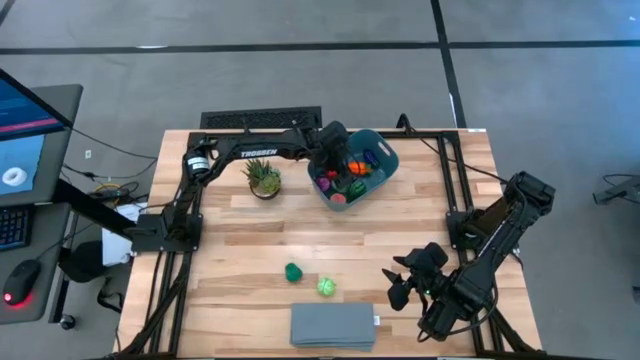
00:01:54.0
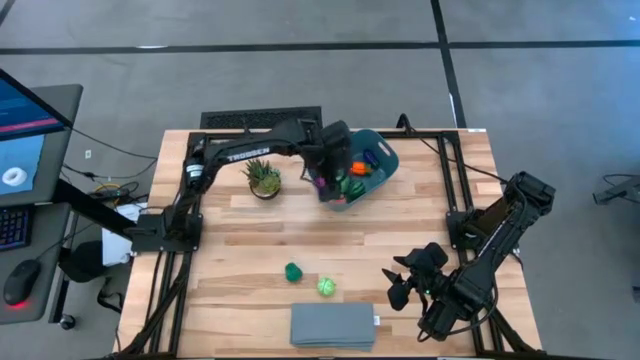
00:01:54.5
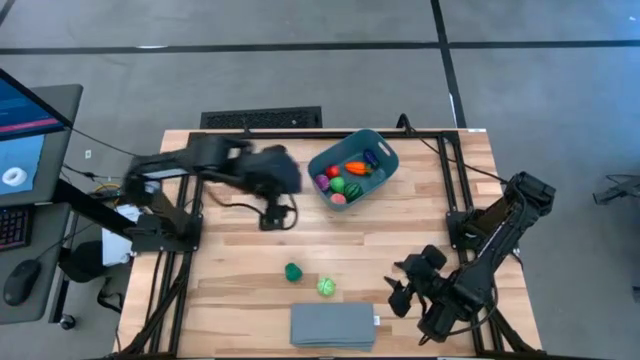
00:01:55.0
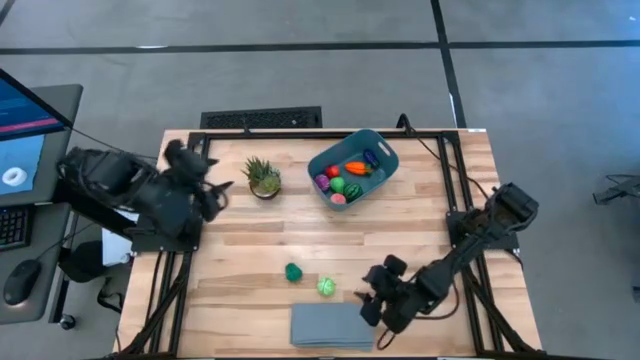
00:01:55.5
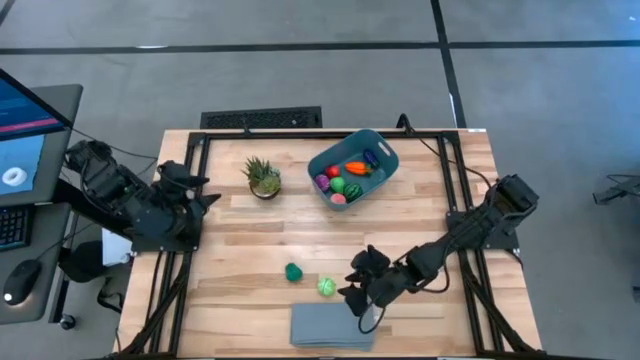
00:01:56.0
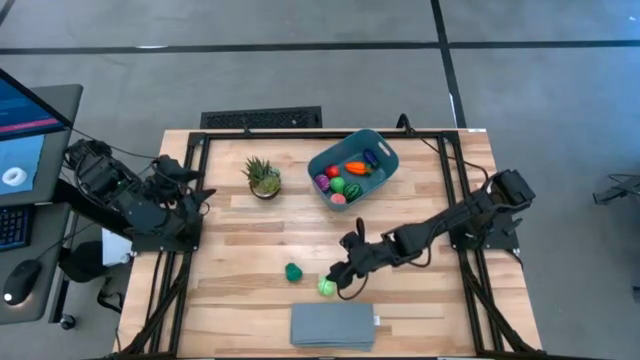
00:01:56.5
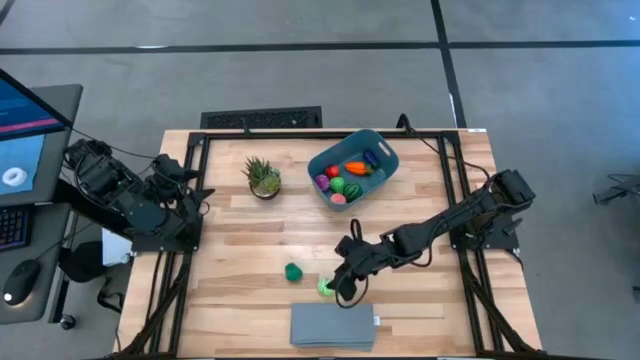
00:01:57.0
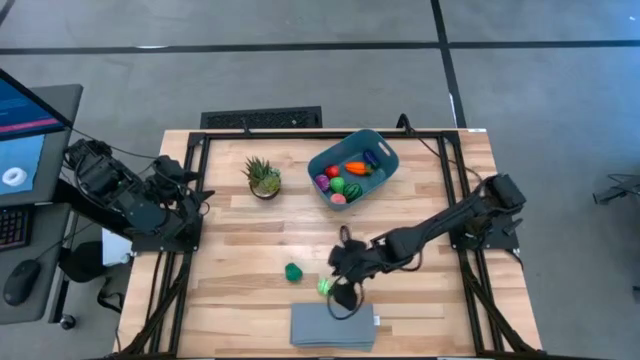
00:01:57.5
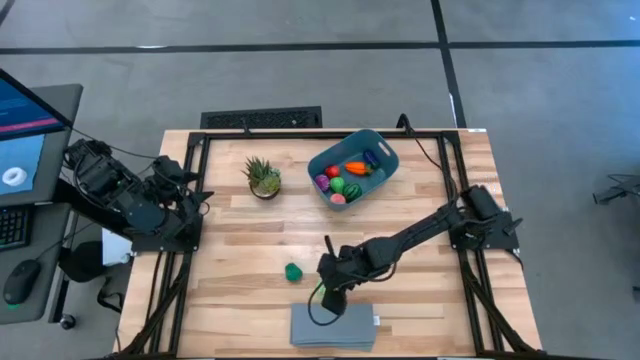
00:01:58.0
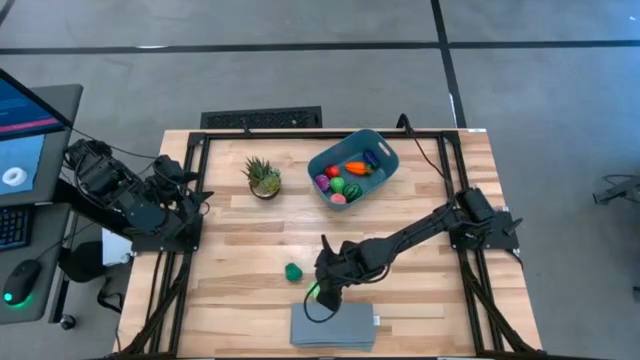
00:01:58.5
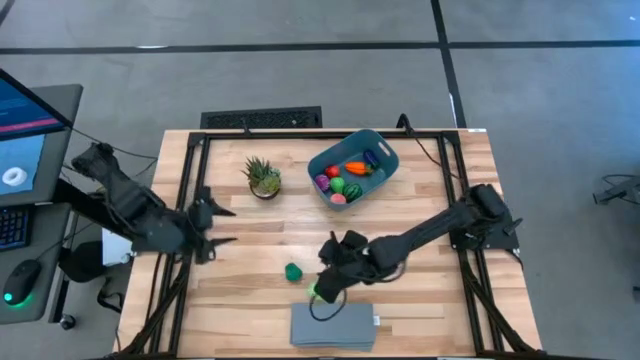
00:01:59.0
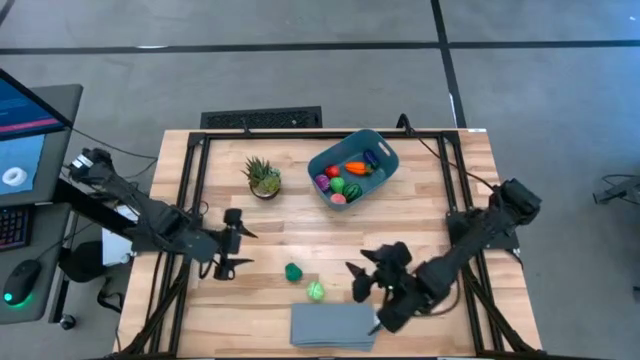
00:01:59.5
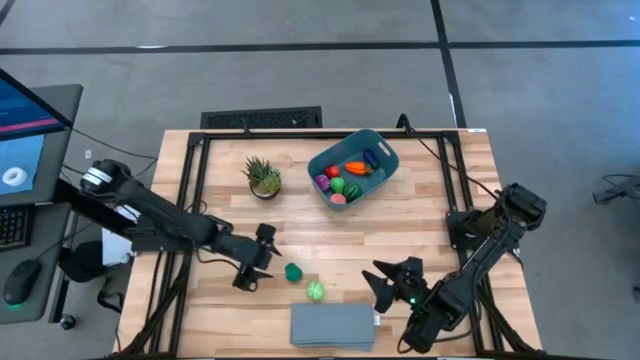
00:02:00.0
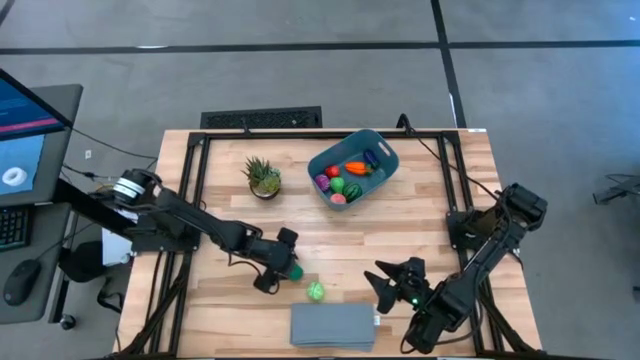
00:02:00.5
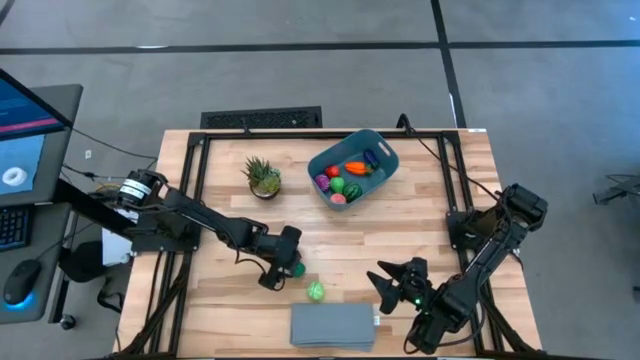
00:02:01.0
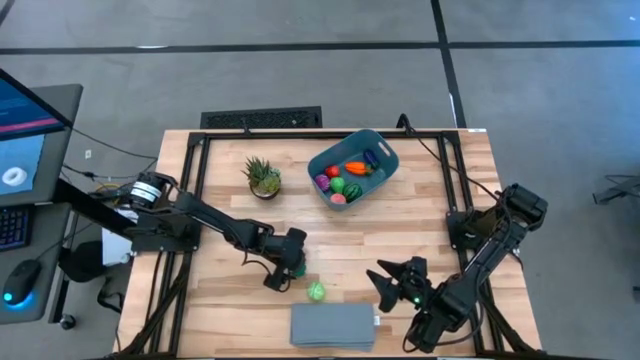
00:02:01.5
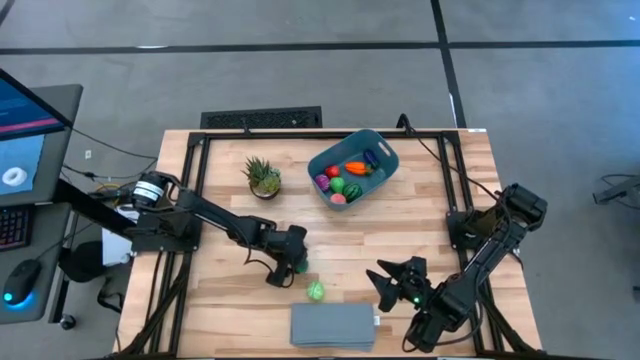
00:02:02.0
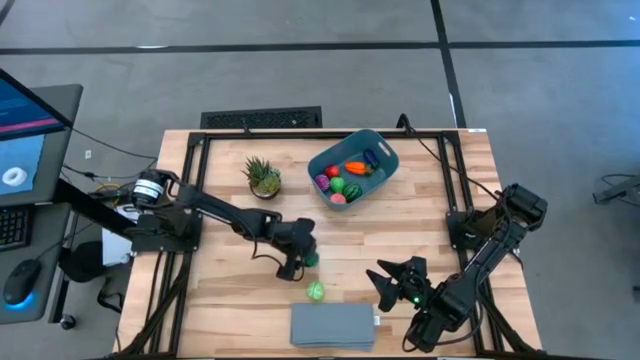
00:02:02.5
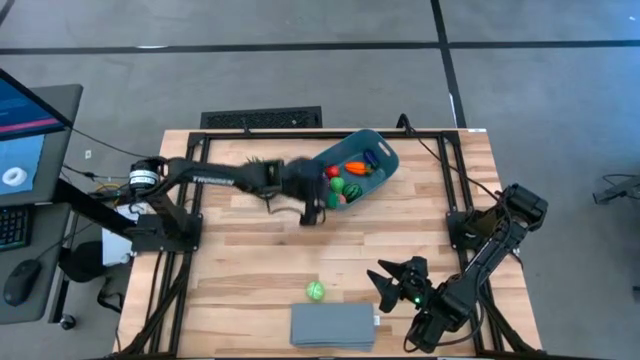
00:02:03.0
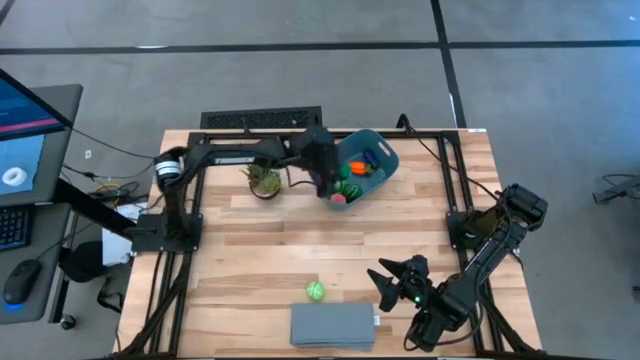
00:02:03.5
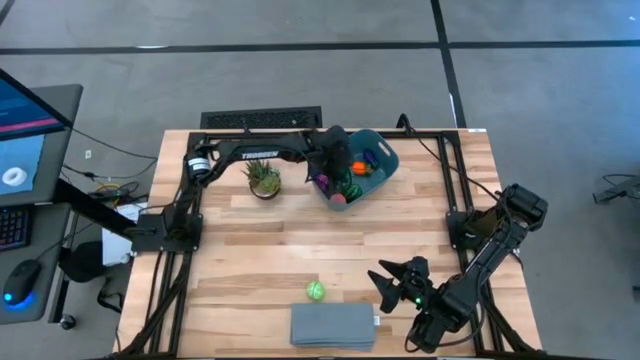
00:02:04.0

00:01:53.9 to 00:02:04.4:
Task: Pick and placing Produce into tupperware
Put the bell pepper into the bin

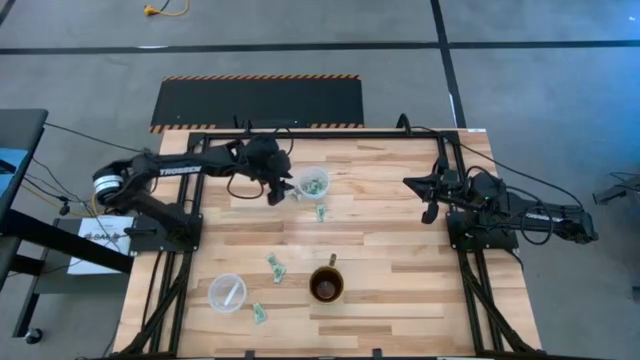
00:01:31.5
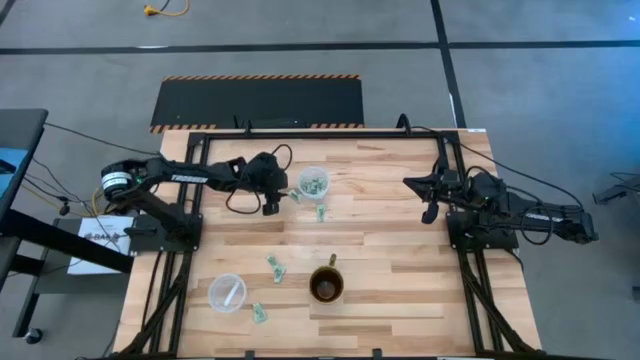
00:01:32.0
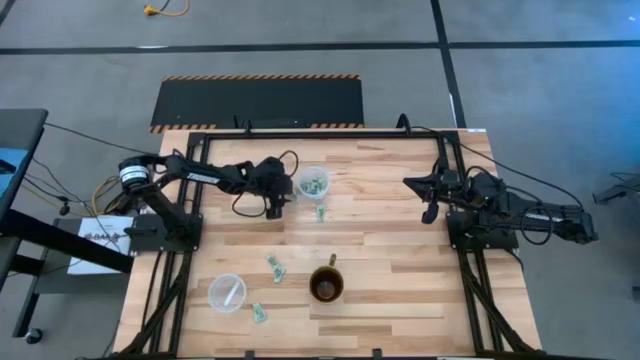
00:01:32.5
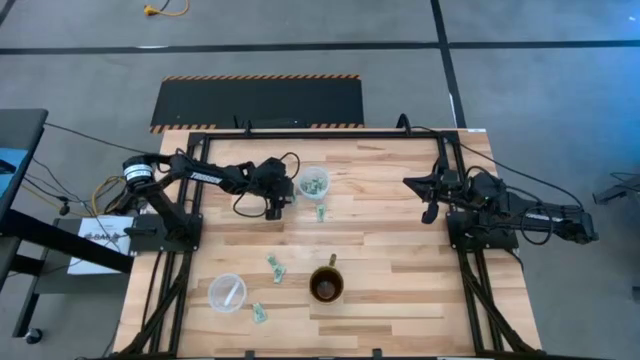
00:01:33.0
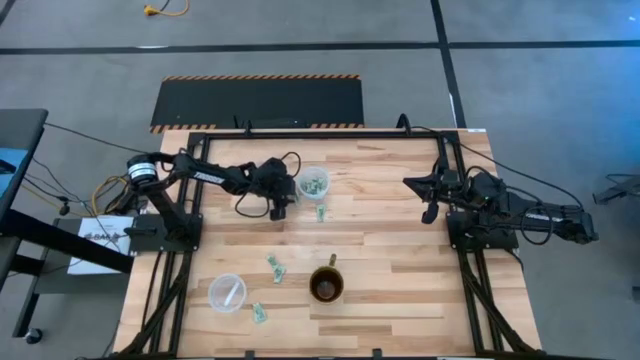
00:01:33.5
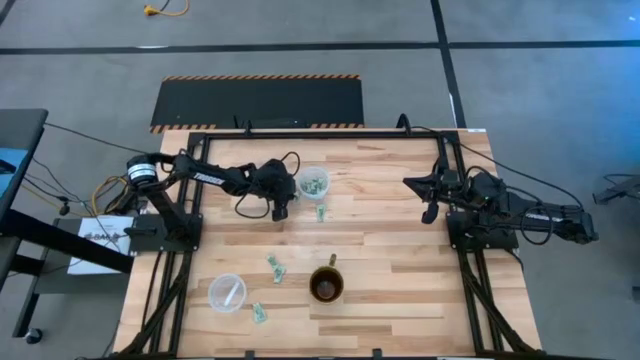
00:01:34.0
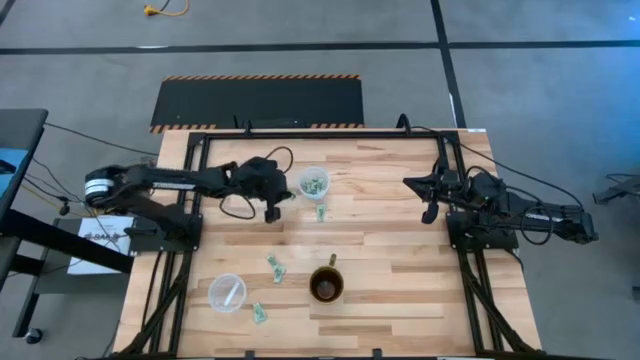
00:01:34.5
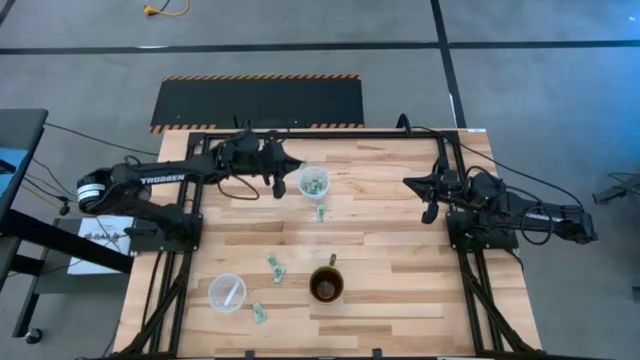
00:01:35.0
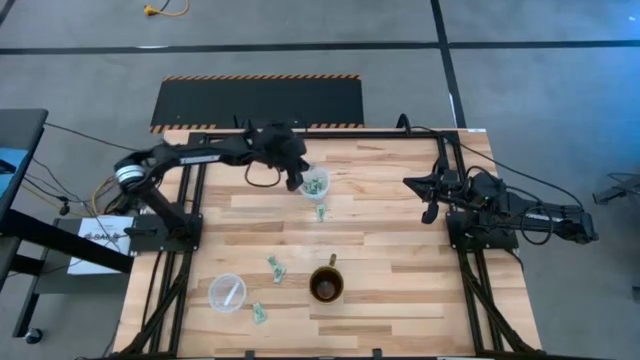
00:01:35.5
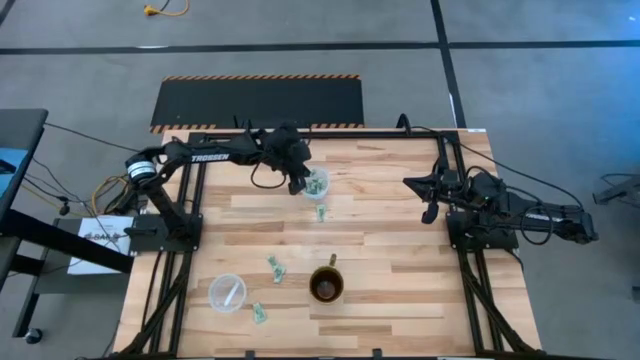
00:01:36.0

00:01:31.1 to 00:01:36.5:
Task: Pick and place items into bin
Put the stevia packet into the top transparent bin
